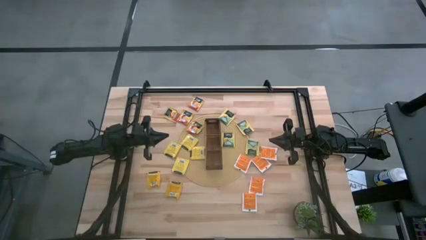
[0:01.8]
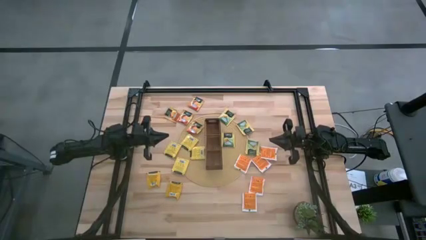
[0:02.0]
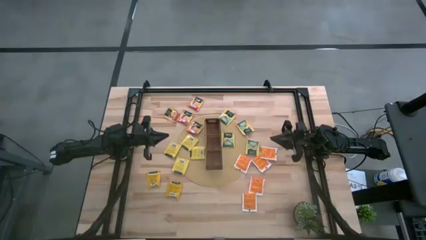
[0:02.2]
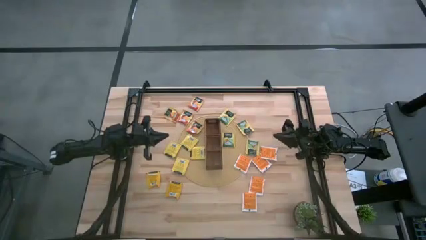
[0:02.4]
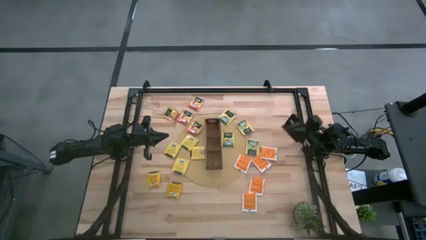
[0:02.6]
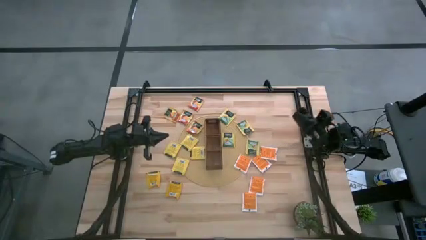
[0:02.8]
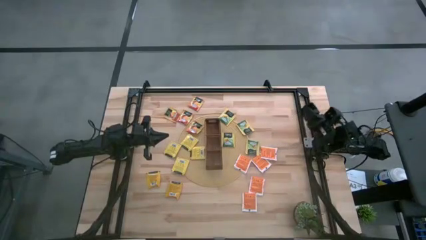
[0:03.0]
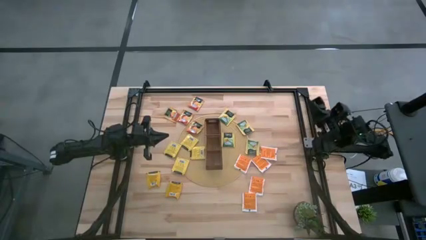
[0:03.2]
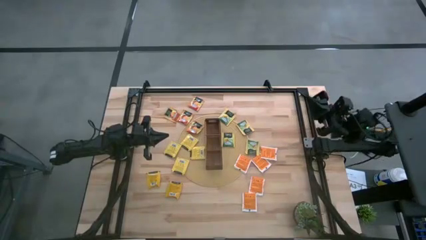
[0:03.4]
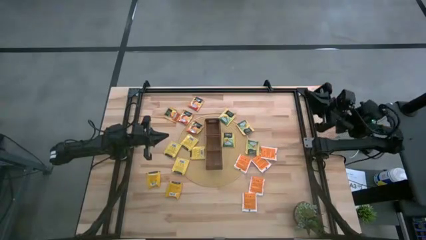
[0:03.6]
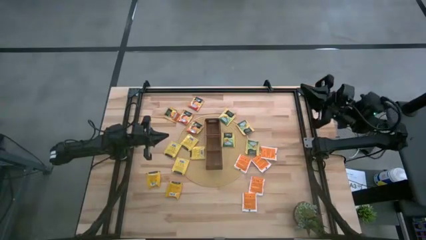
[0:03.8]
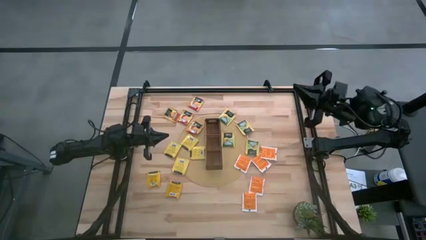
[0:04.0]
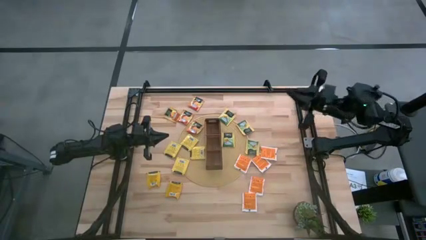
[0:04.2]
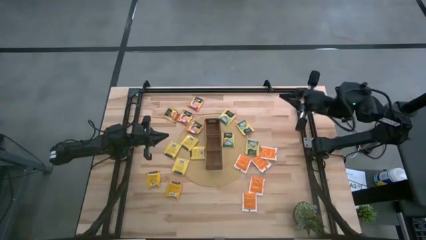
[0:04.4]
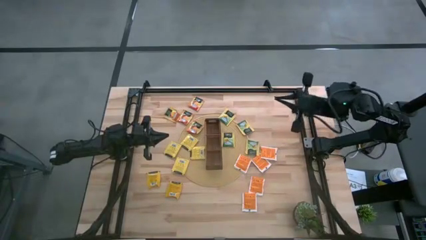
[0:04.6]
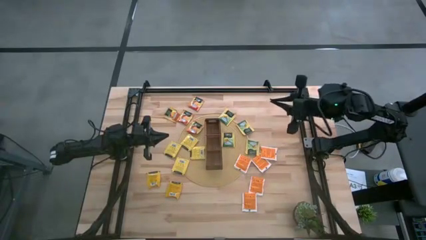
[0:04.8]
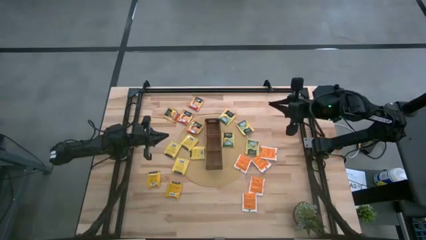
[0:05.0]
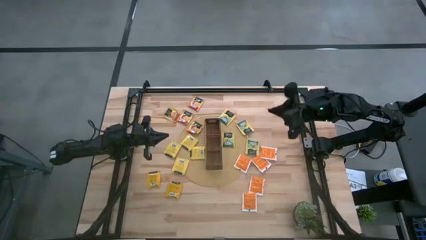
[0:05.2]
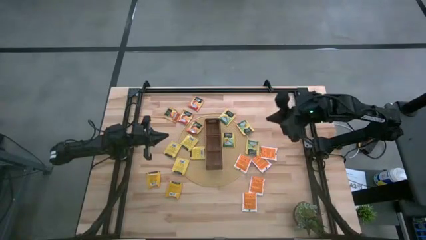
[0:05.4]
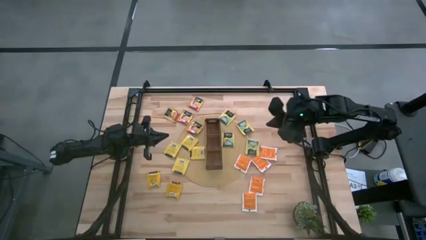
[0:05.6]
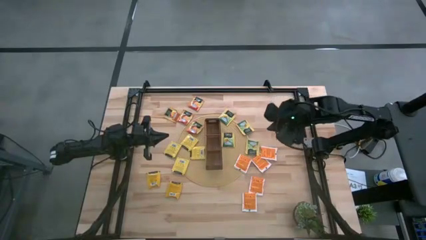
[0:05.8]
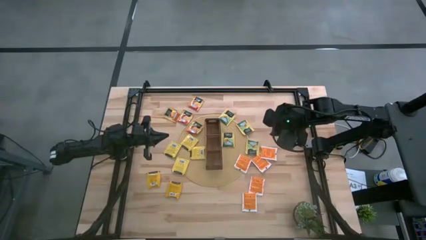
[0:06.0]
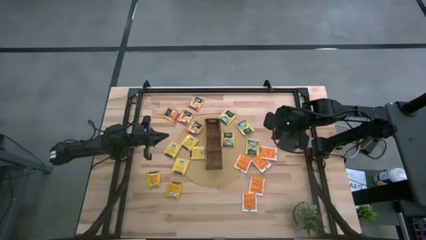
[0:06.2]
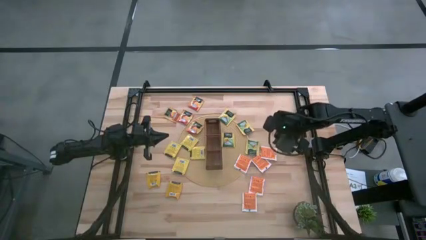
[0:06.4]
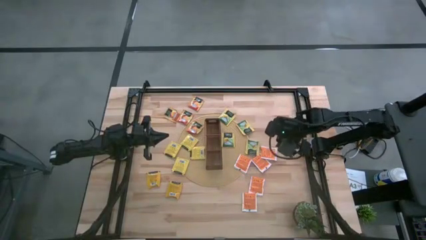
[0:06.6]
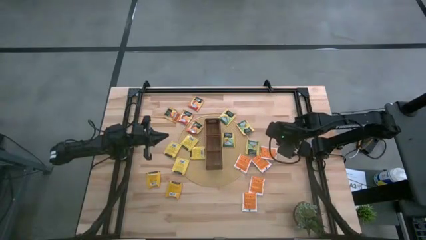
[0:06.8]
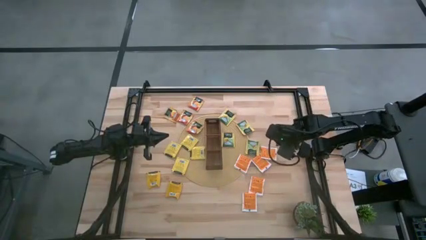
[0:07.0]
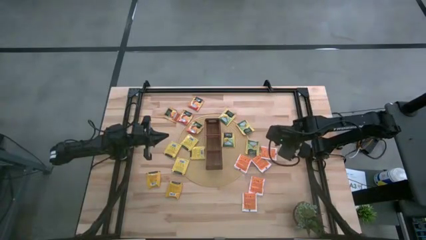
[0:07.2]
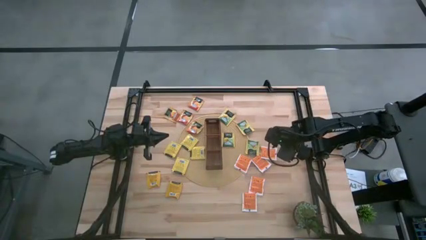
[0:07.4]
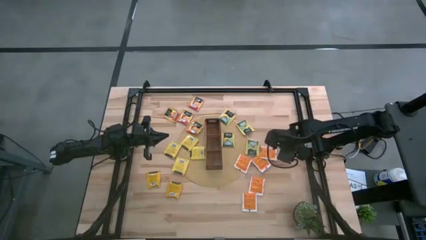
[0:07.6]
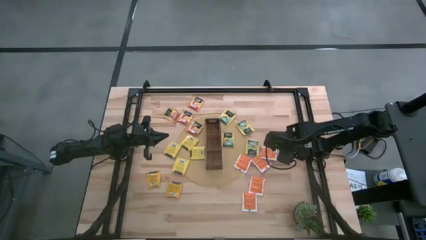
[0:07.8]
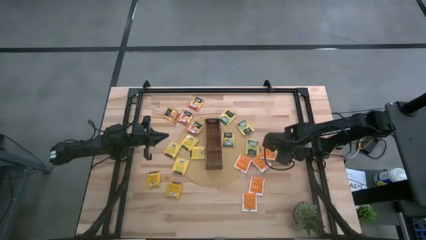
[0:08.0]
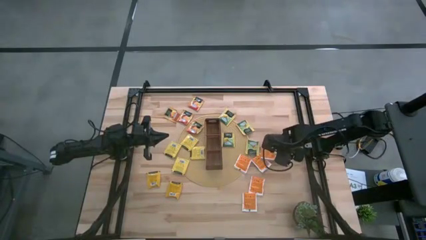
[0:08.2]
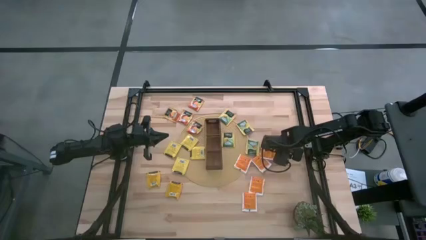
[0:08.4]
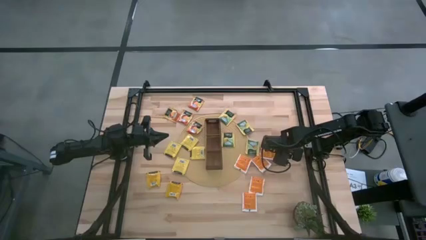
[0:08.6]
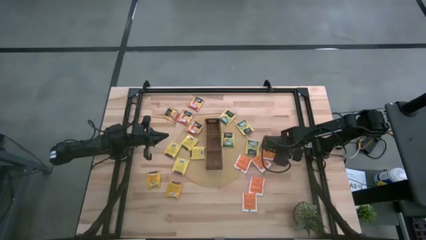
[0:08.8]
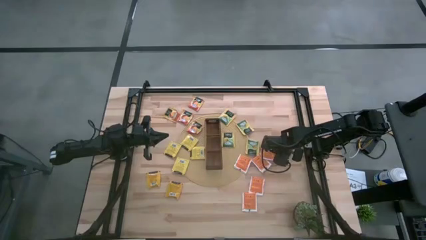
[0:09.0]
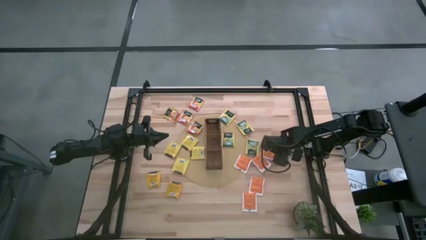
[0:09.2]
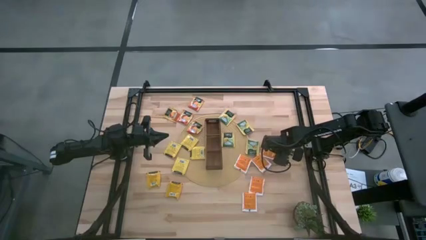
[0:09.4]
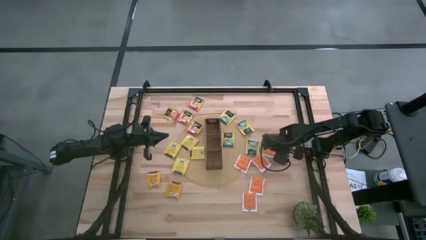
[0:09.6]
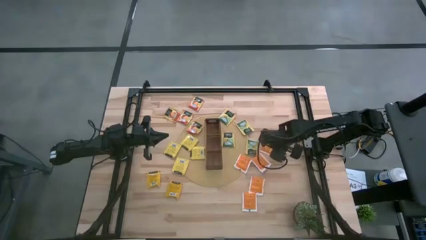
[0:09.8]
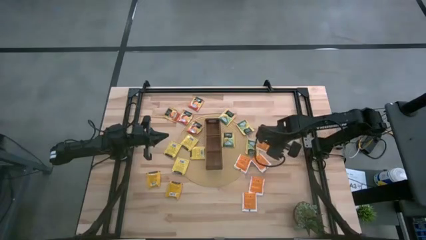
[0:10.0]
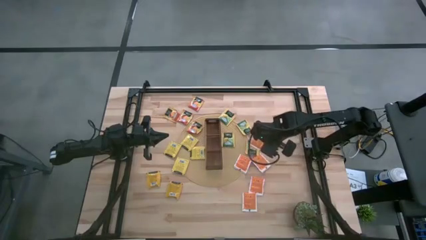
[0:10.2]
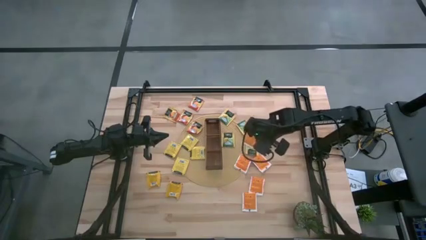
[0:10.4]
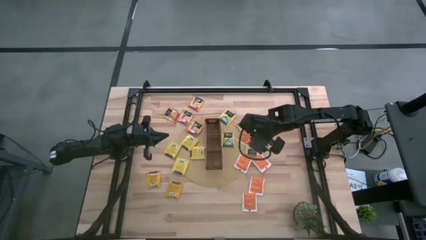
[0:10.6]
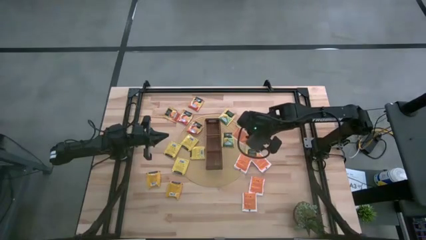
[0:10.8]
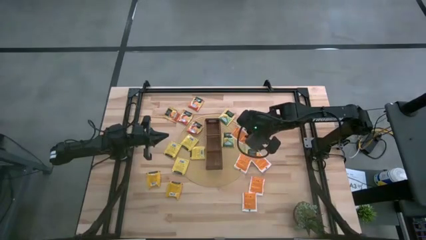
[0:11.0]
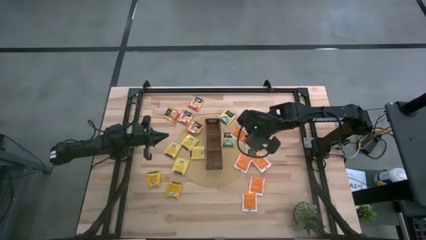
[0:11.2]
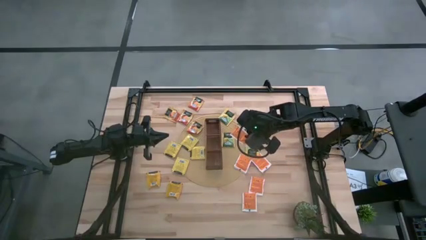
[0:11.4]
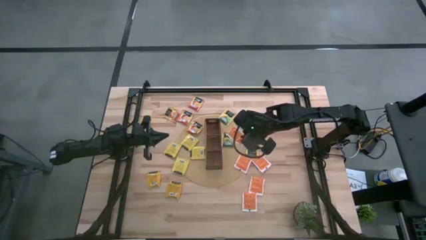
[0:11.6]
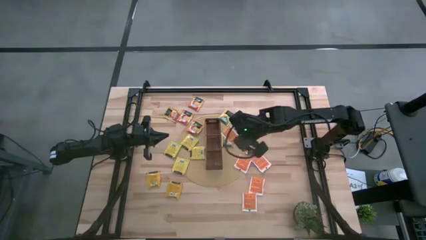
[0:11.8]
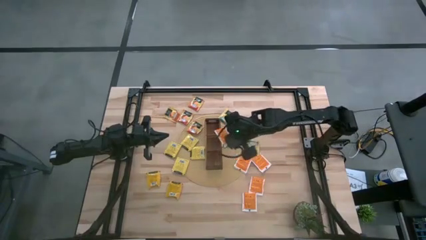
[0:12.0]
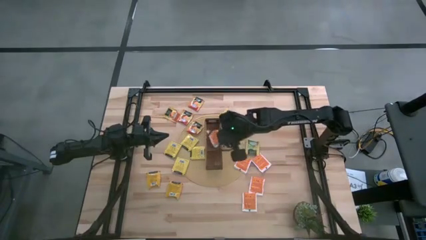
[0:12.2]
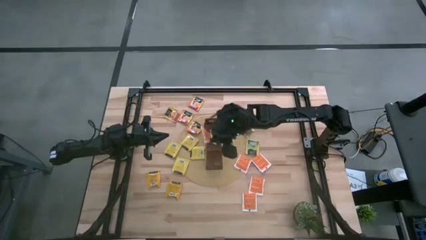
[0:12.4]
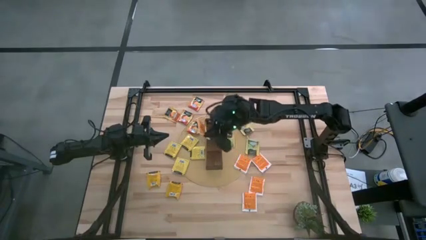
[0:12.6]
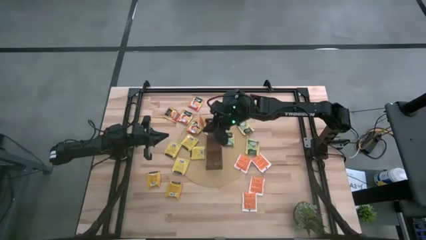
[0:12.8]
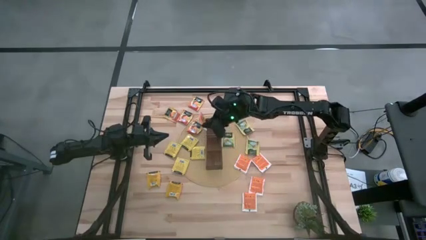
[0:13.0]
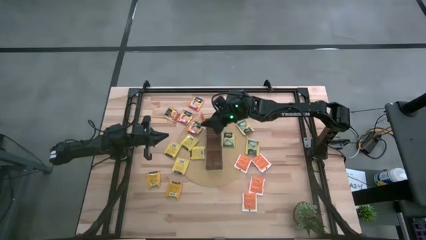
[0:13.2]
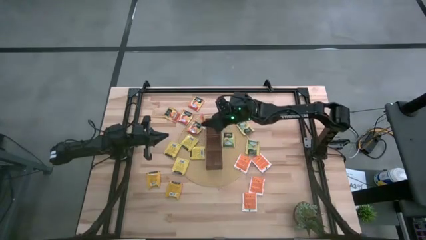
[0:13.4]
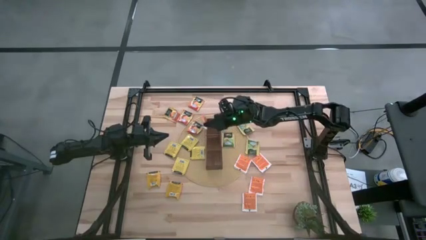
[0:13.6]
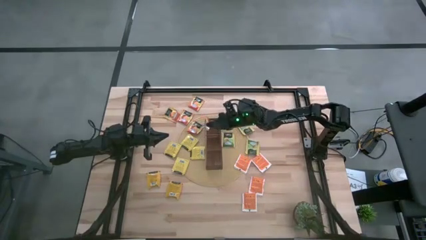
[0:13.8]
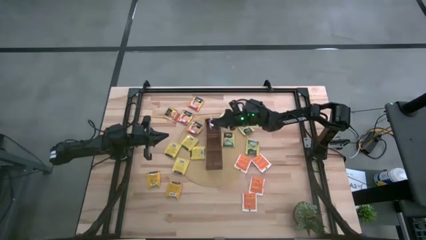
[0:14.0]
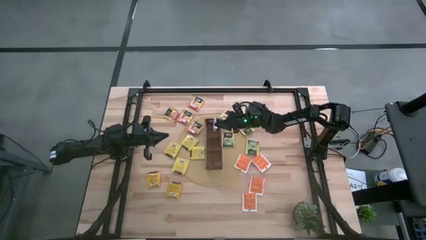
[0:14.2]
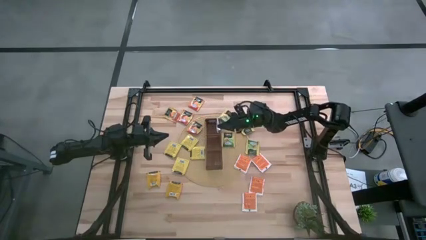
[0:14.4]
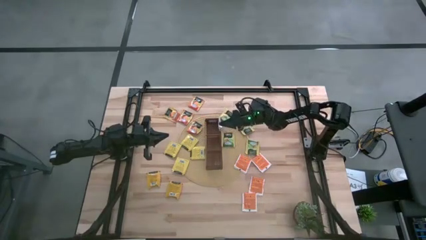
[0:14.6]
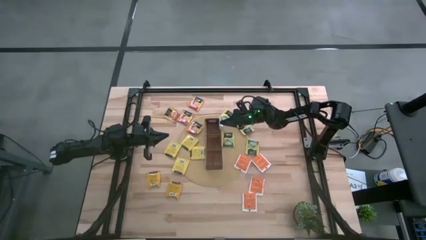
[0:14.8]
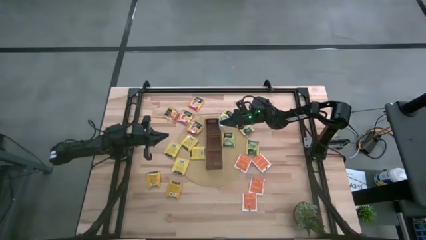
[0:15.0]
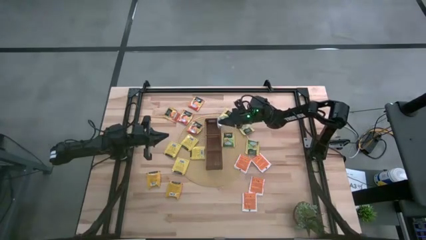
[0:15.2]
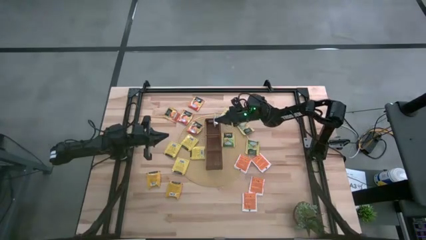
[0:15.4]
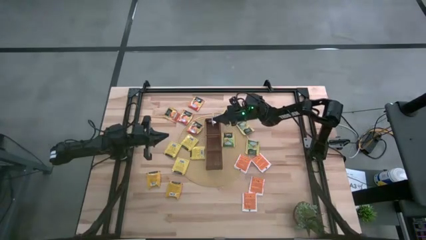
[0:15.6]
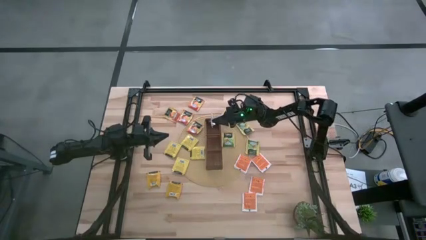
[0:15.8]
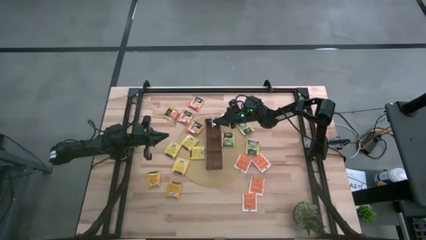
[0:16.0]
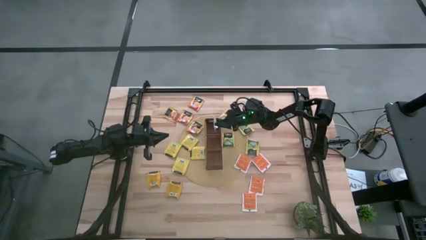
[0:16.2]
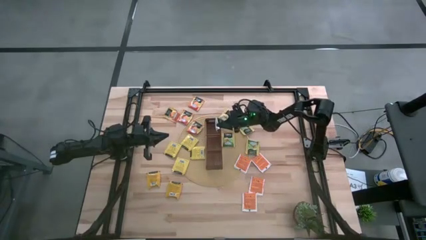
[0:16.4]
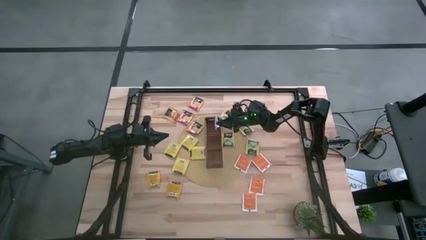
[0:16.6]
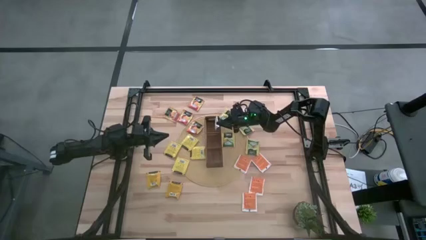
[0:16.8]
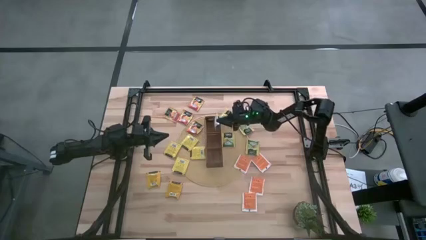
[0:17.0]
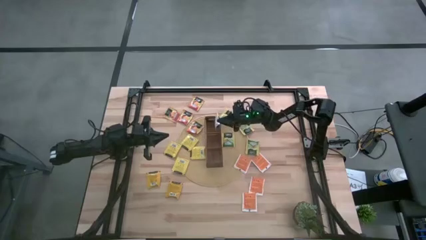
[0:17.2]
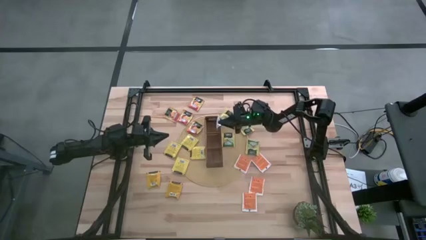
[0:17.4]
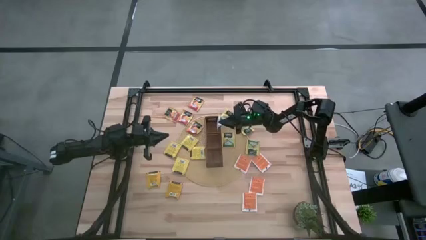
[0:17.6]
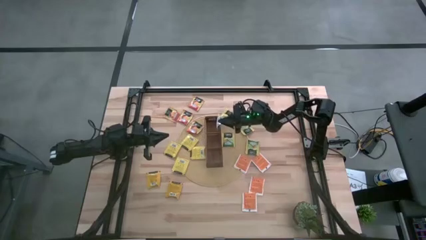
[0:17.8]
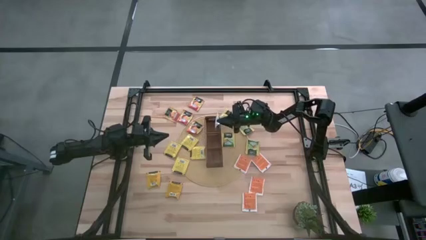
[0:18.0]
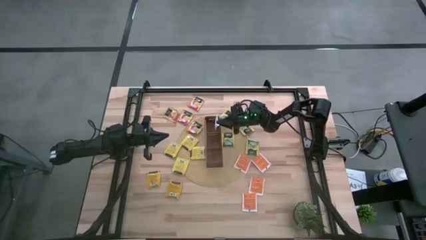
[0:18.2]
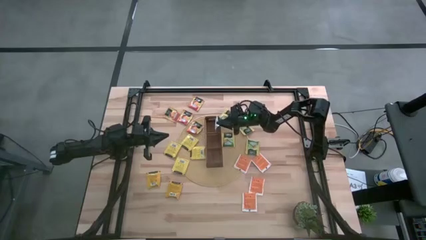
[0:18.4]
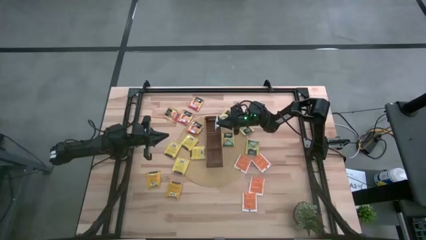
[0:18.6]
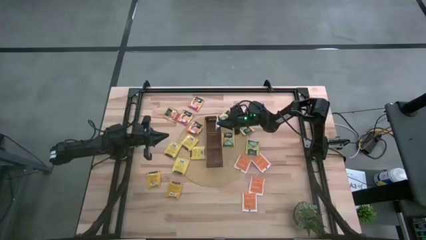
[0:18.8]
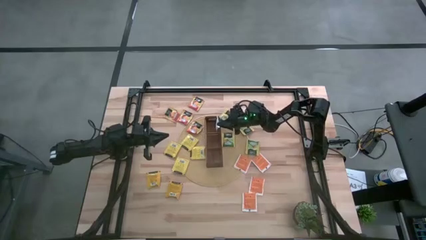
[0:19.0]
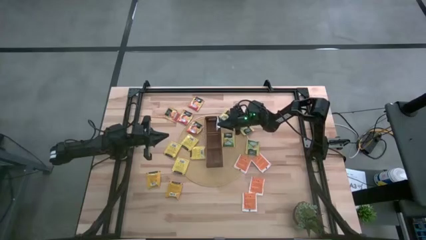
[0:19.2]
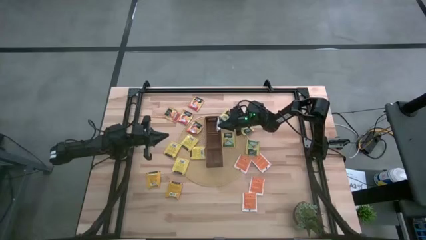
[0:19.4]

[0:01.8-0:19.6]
Task: Pick & Place Tea
Put the white tea bag into the top section of the wooden organizer
